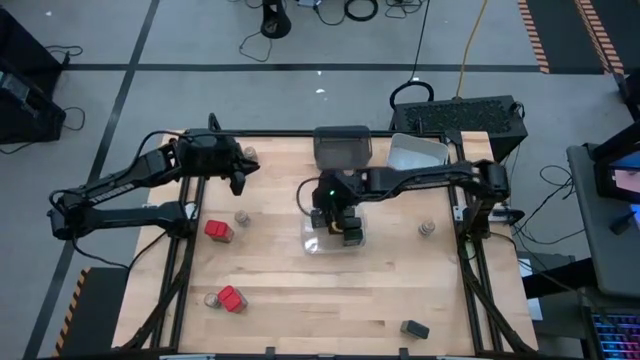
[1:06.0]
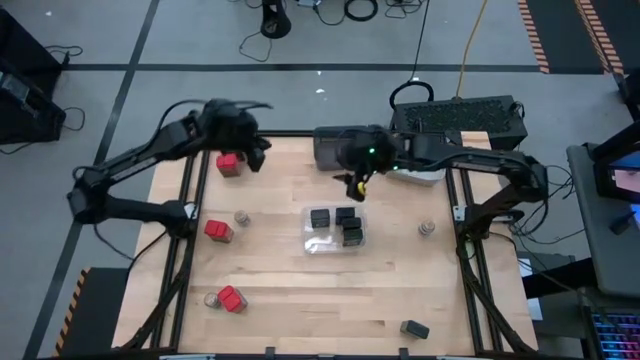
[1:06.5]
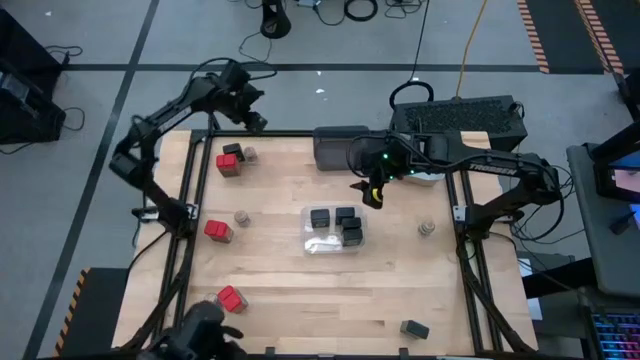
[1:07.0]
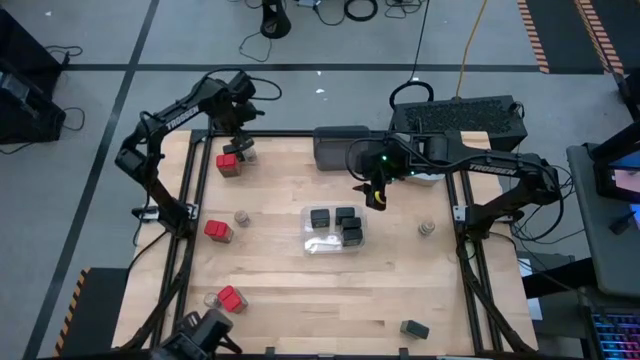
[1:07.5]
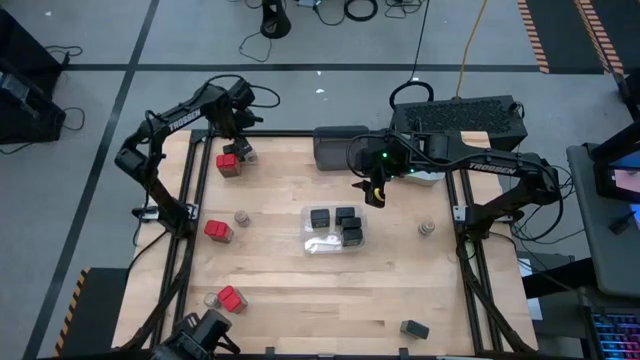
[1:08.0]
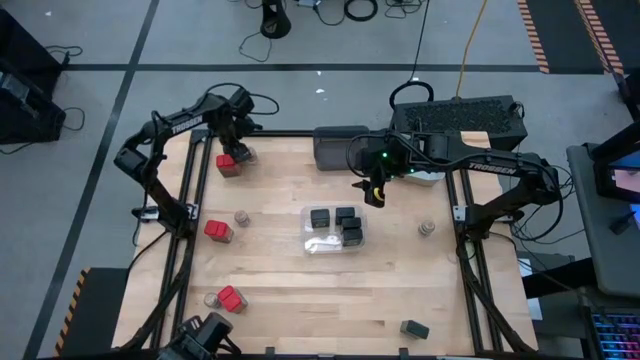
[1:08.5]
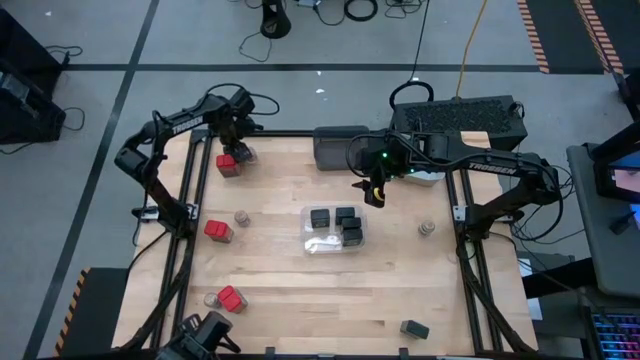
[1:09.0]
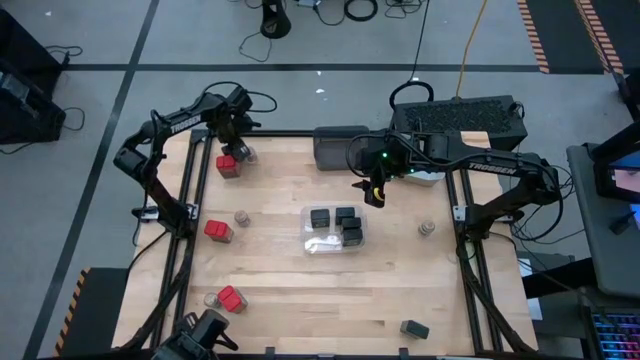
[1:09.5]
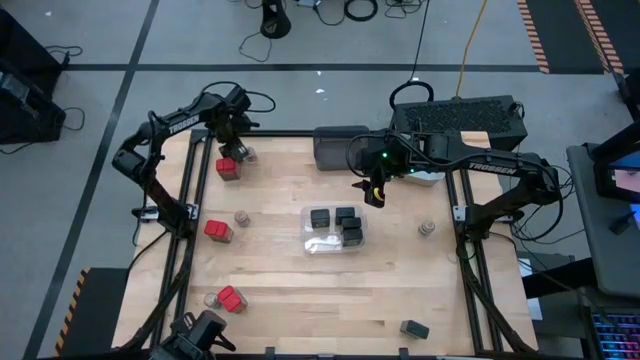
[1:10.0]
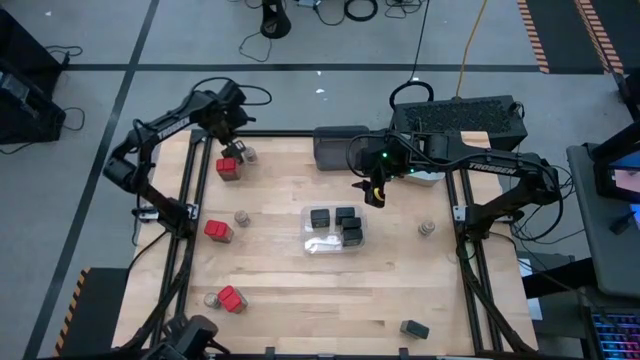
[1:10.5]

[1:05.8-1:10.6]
Task: Sort spices by type
Put the black seasoning can into the transparent bin

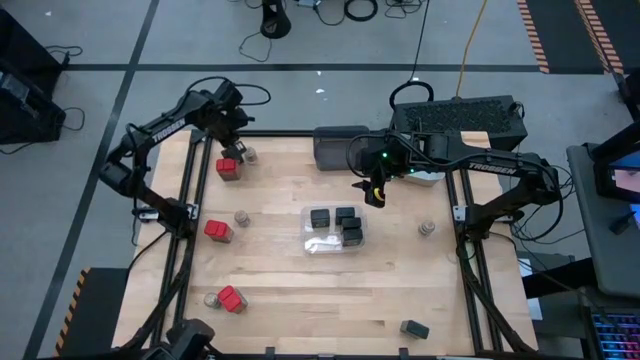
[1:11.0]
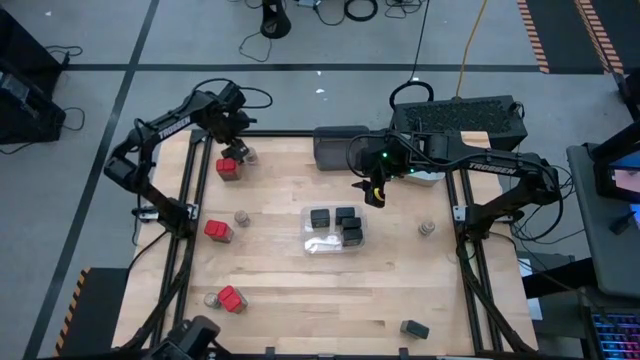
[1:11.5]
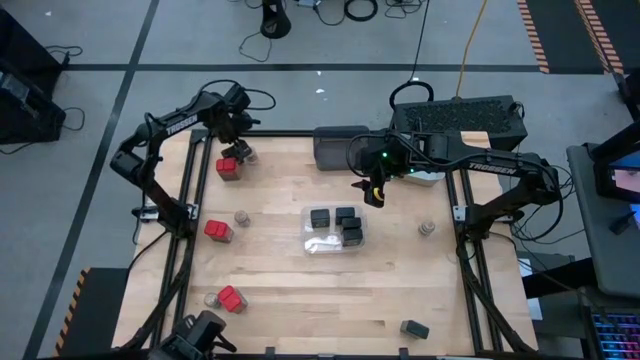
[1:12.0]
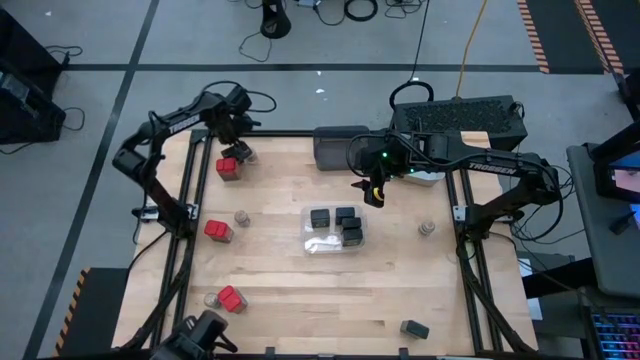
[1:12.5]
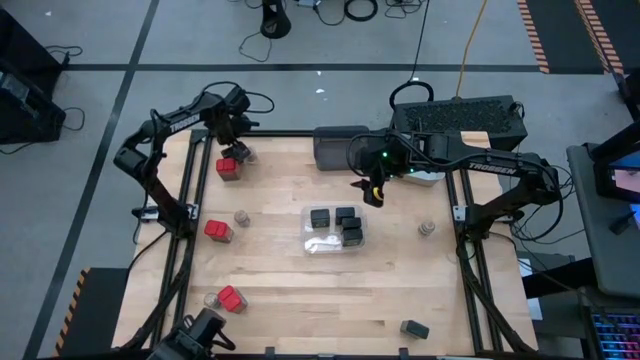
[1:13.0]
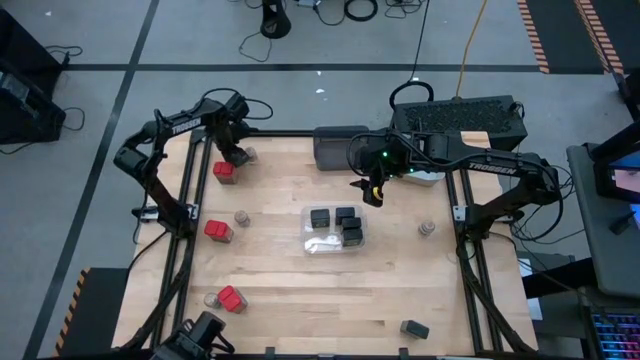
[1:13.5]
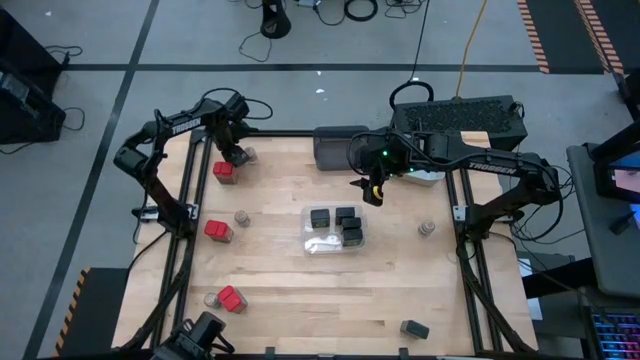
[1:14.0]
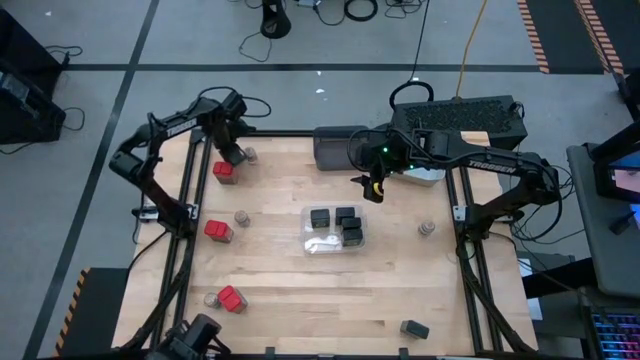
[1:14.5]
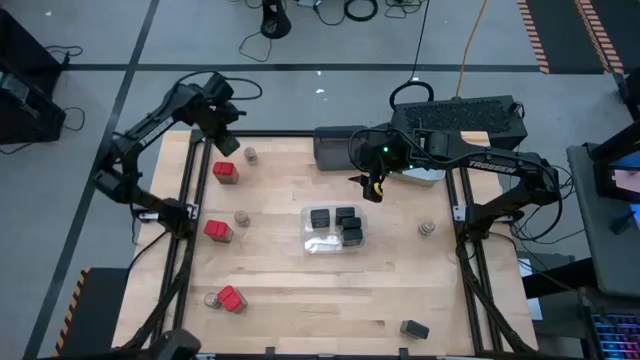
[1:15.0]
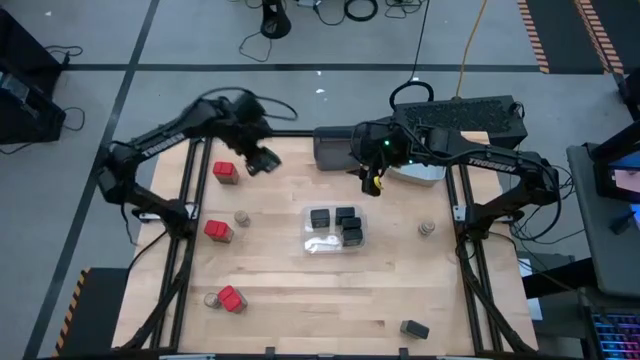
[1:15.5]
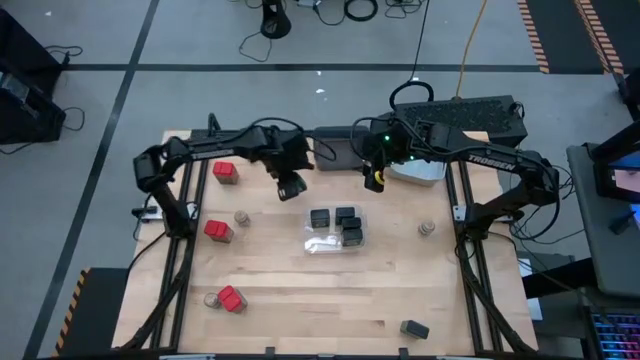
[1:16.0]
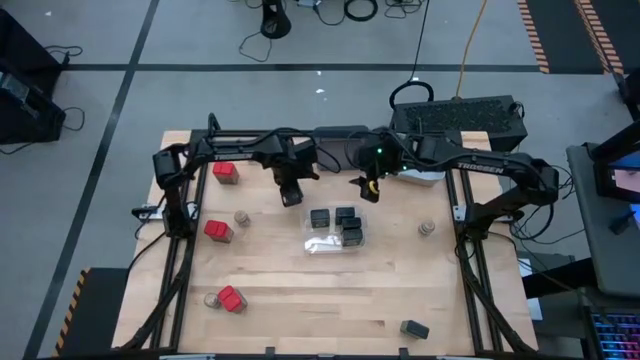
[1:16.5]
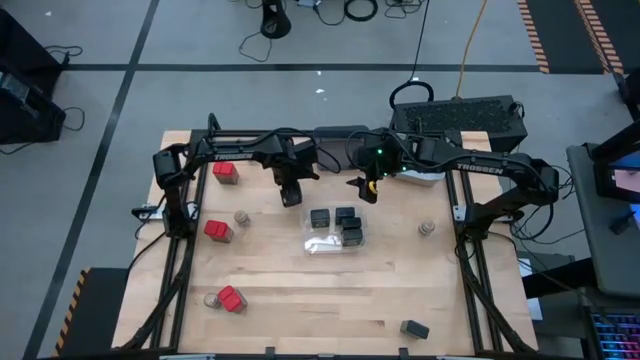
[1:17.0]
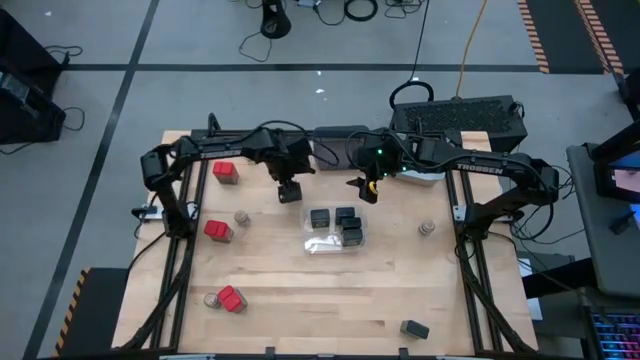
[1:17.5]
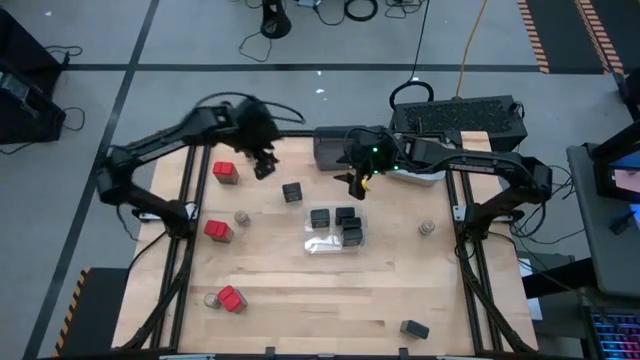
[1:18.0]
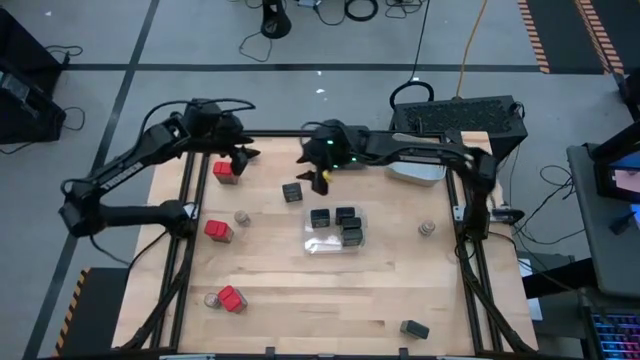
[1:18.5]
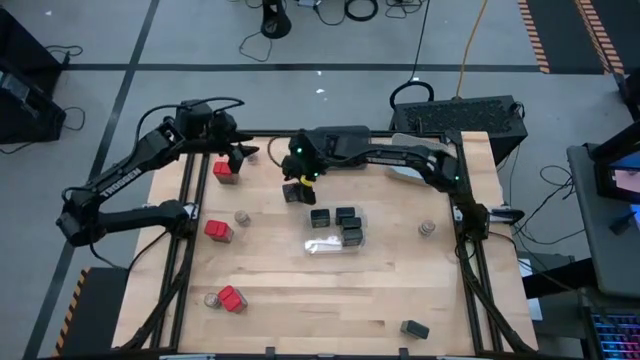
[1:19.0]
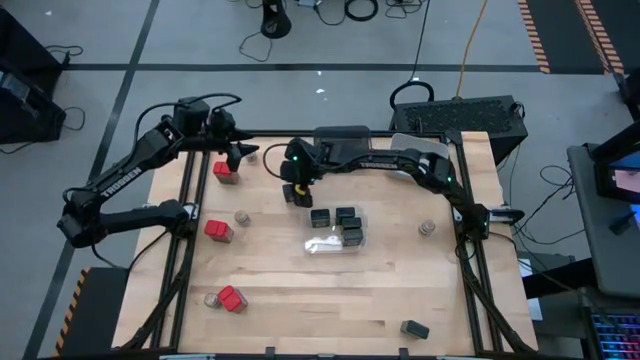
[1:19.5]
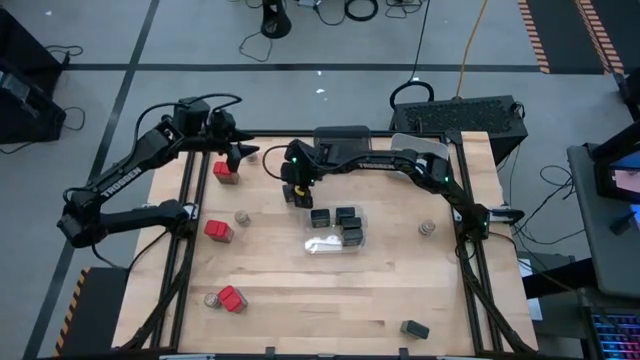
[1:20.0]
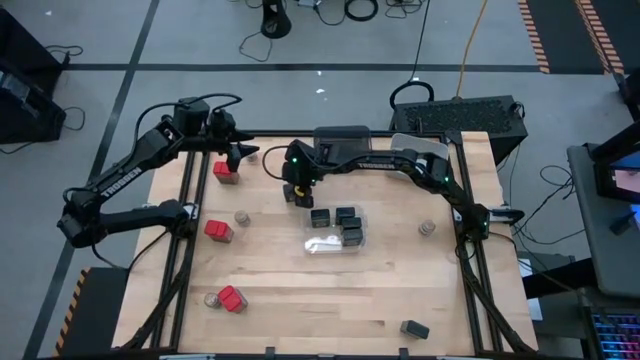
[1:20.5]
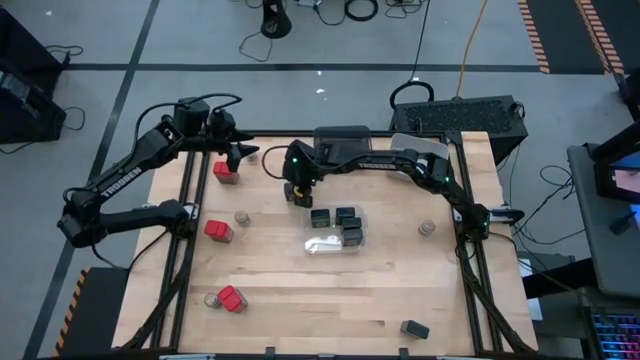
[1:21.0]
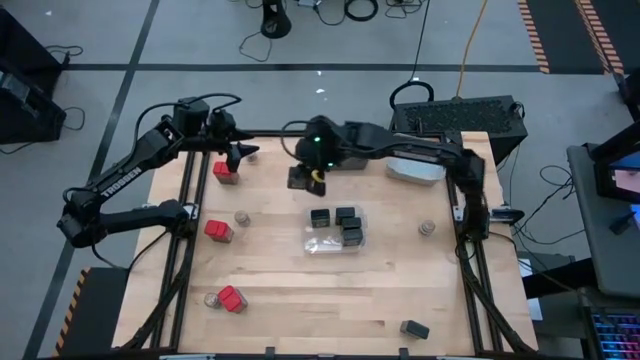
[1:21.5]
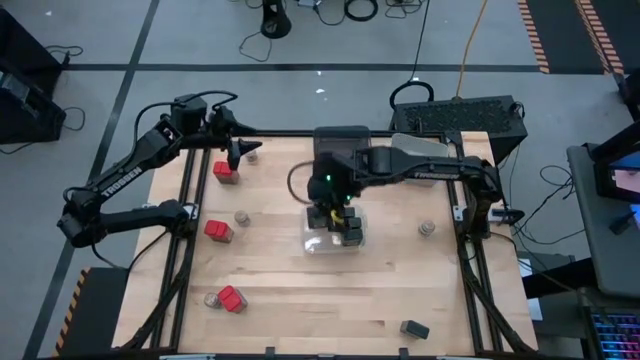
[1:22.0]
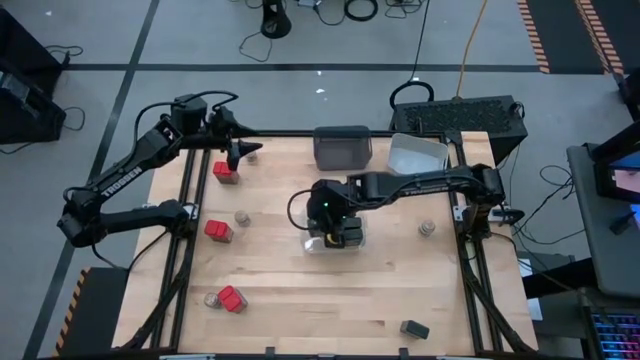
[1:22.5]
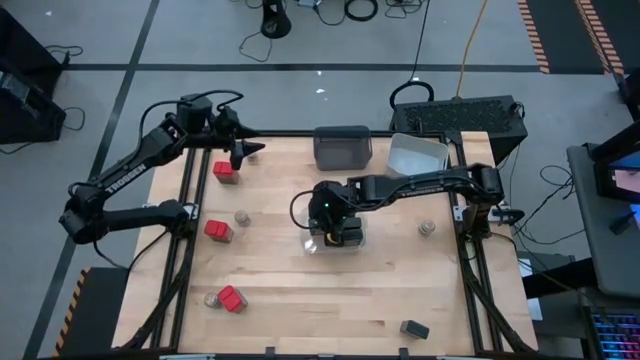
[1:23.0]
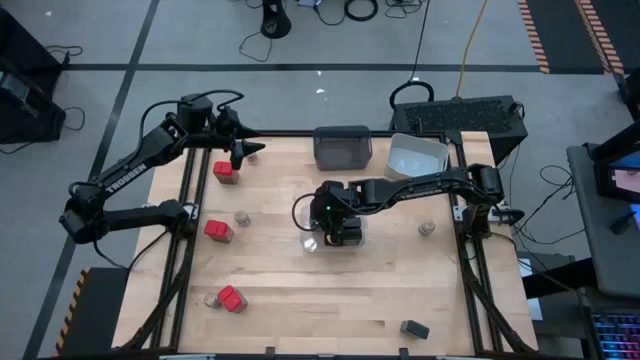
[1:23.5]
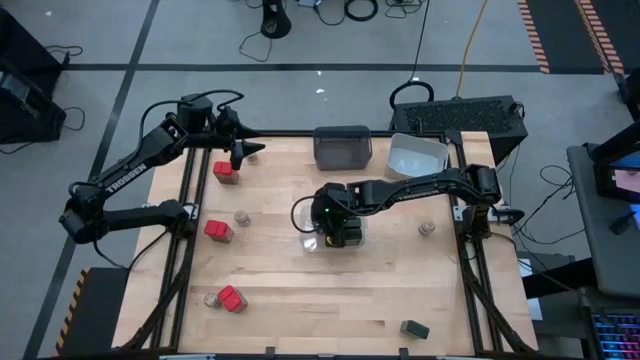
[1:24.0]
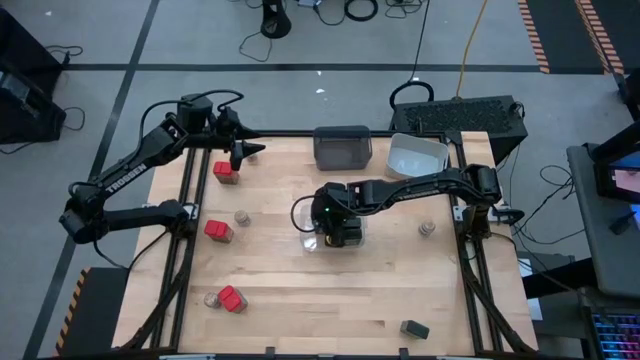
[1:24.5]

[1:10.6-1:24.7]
Put the black seasoning can into the transparent bin

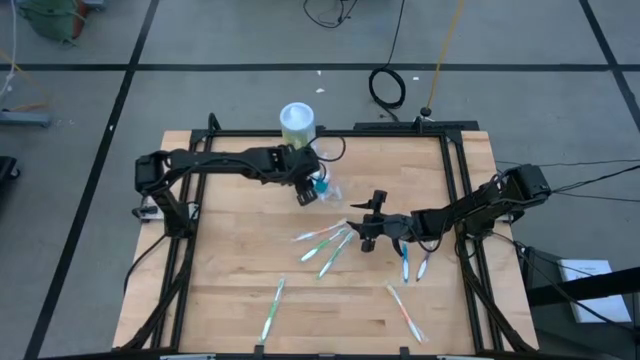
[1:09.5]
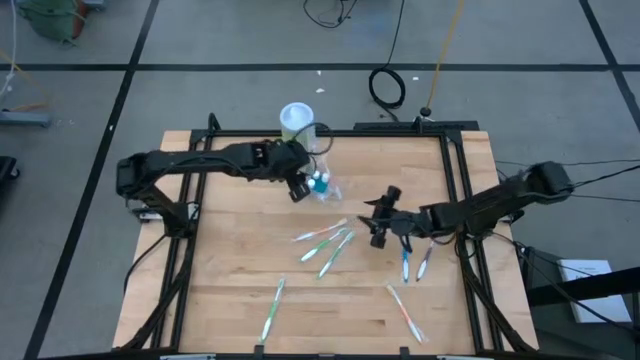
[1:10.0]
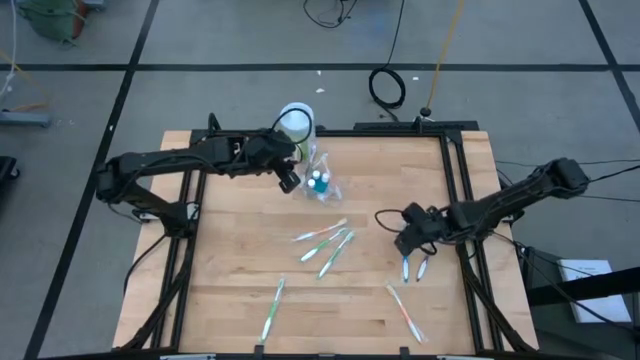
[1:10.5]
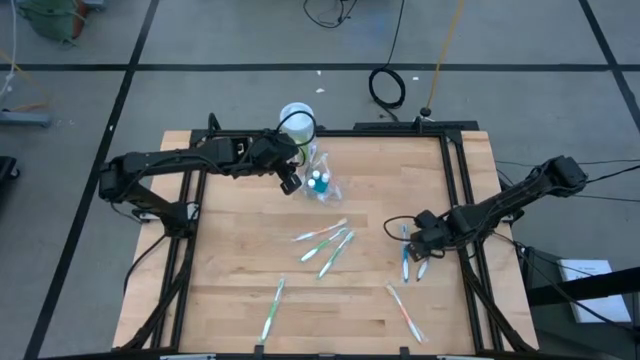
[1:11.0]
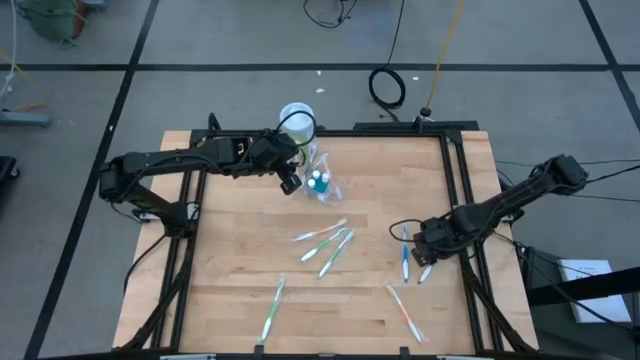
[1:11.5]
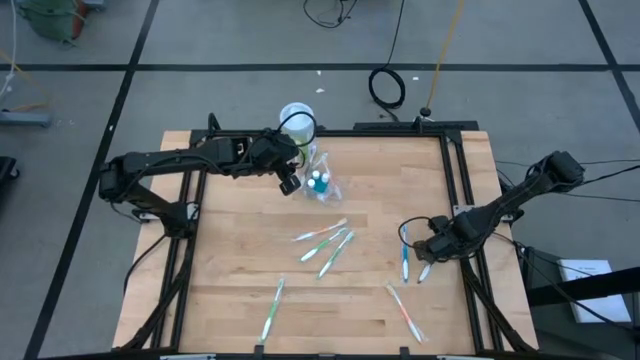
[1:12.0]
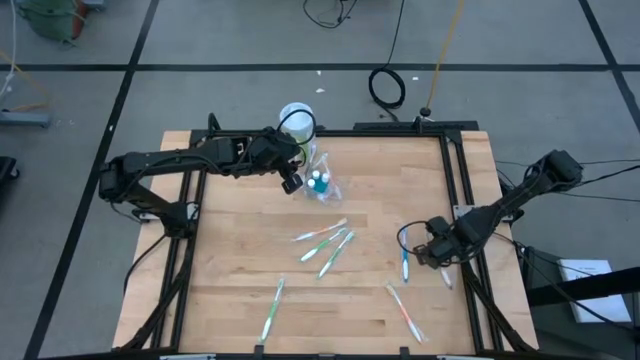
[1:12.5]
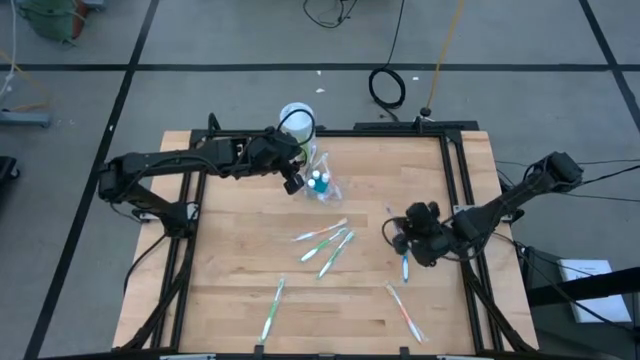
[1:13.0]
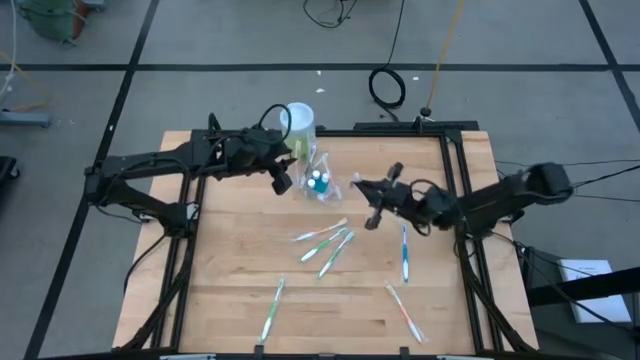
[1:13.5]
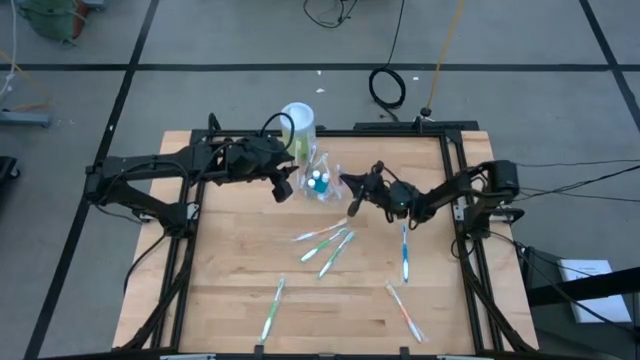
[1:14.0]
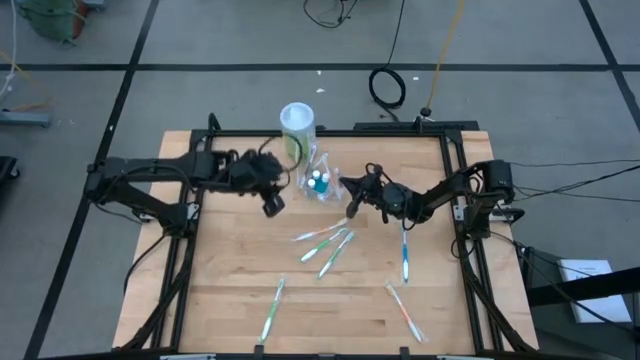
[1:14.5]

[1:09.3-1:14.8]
Task: Pick & Place toothbrushing station
Put the purple toothbrush into the right of the transparent organizer
